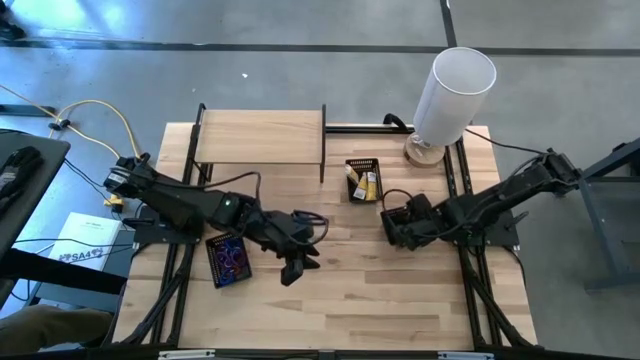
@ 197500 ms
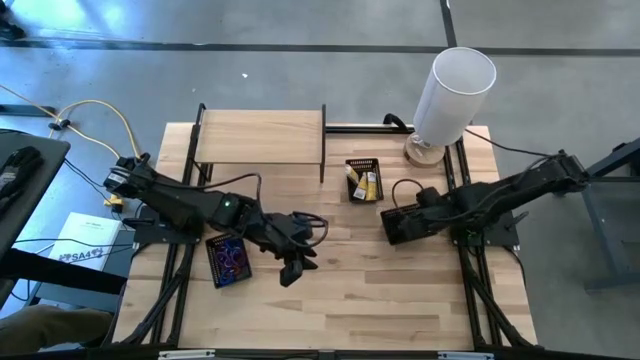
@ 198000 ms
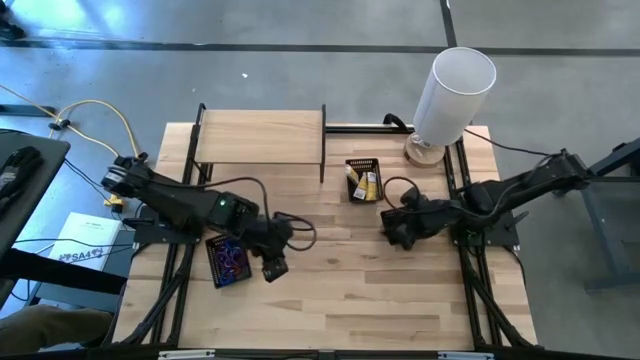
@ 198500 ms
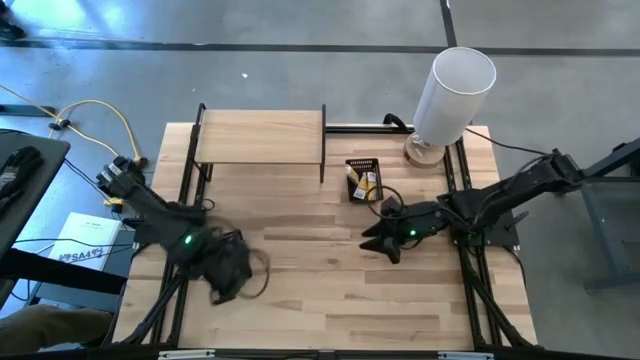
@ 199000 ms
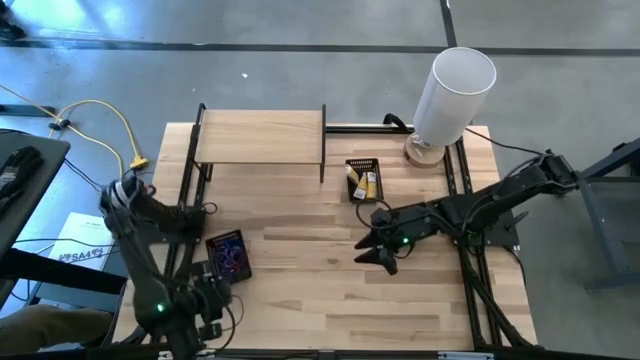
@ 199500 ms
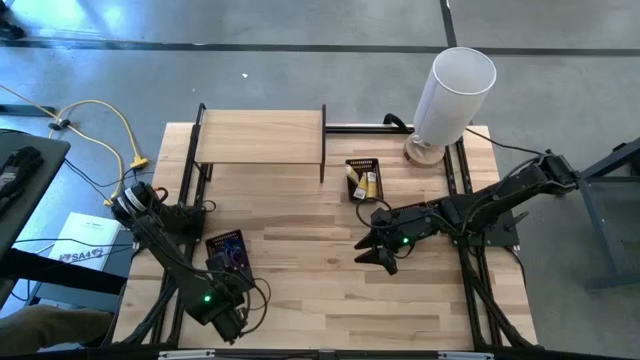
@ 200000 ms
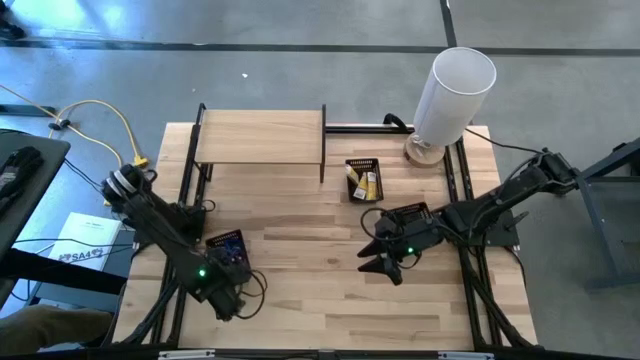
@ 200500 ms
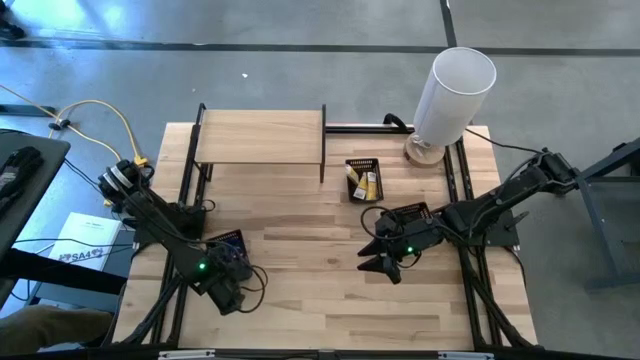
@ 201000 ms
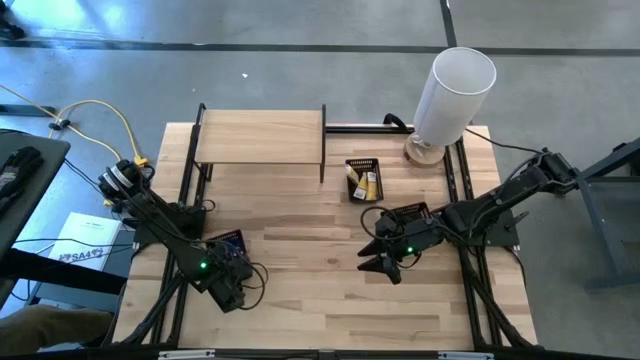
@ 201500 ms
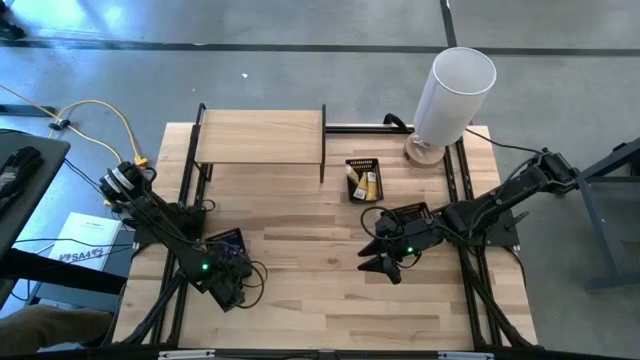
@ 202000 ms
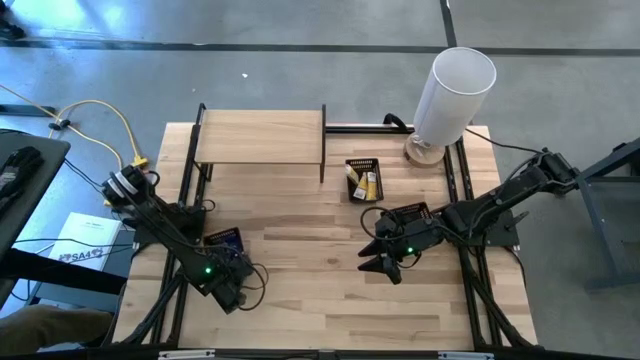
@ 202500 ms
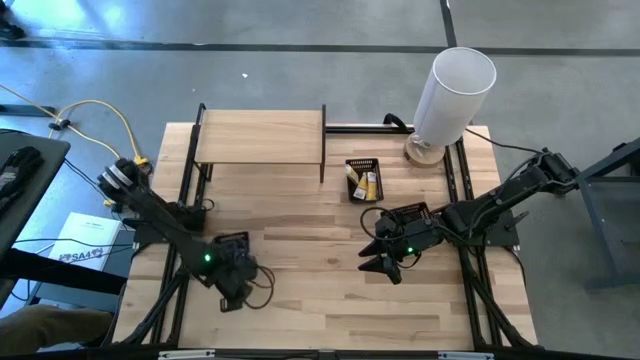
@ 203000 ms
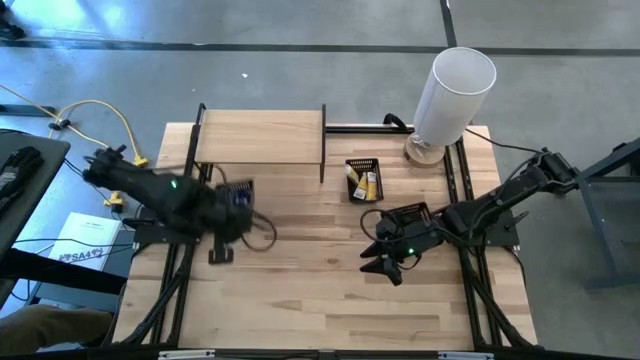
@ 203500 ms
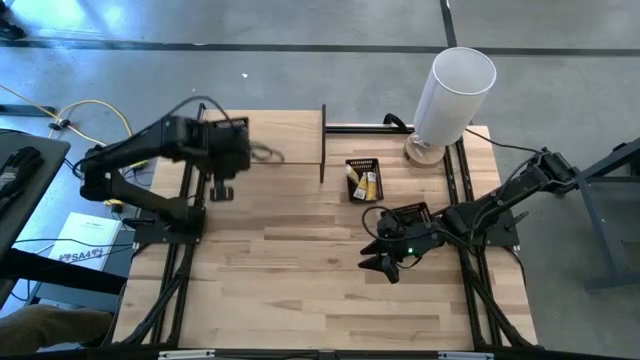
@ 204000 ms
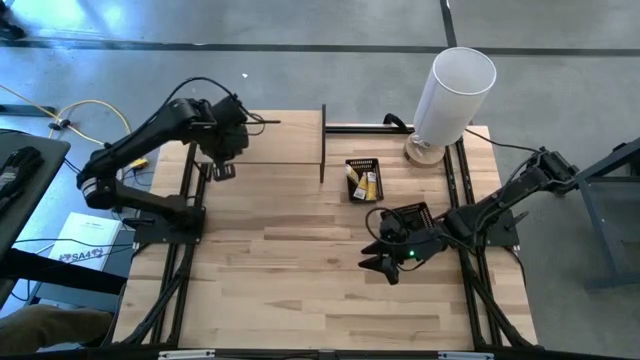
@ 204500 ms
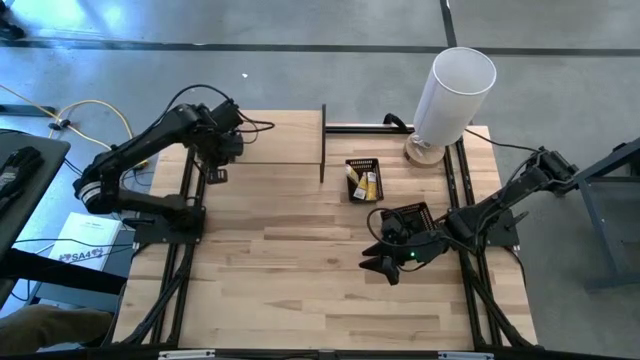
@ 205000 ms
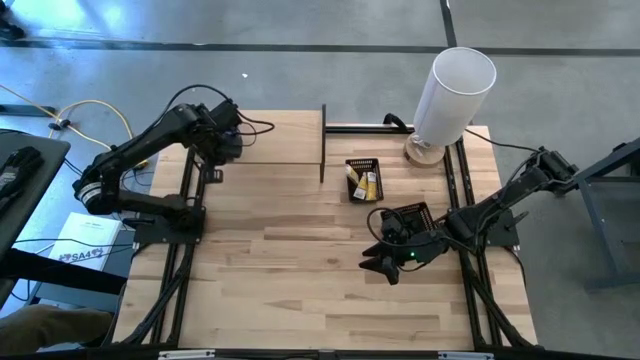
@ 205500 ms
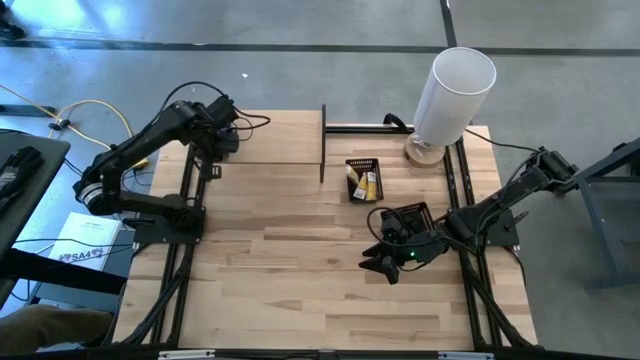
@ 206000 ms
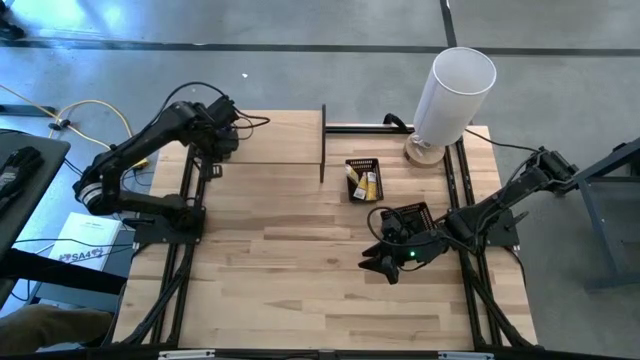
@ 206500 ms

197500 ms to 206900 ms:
Task: Pick & Place Office Desk Supplies
Put the bottom left black bin with spring keychains on the shelf

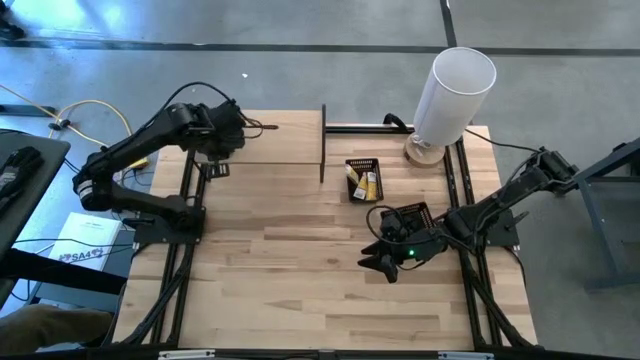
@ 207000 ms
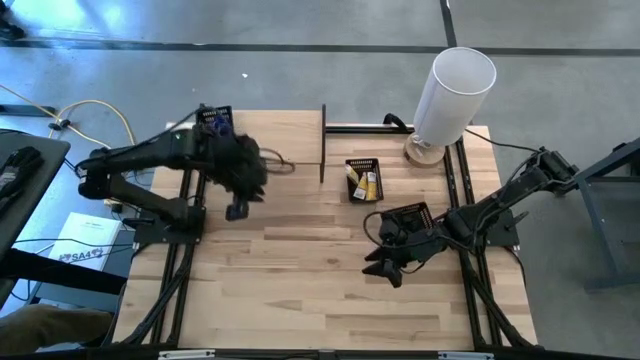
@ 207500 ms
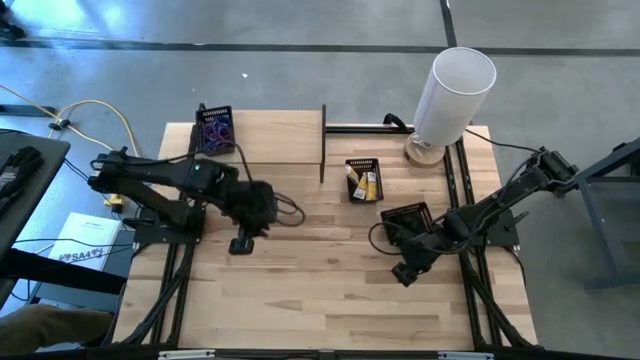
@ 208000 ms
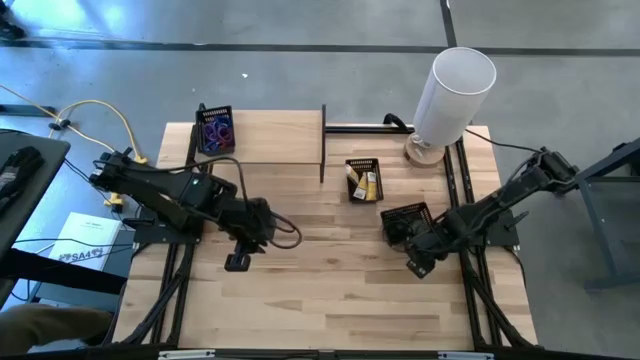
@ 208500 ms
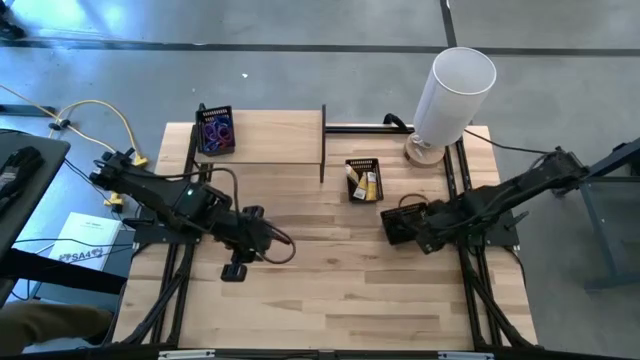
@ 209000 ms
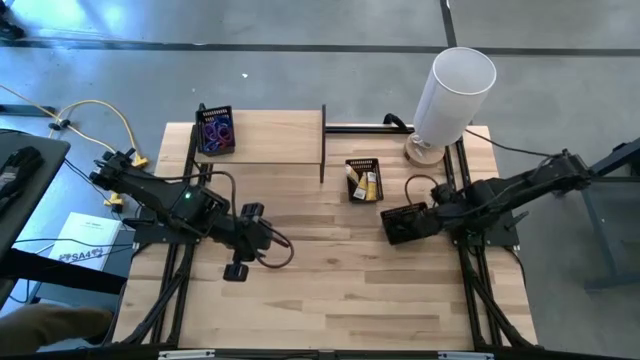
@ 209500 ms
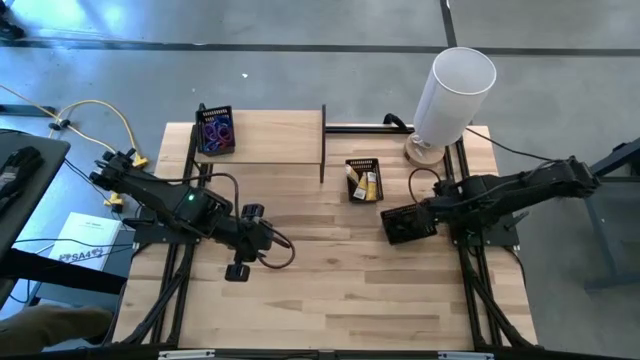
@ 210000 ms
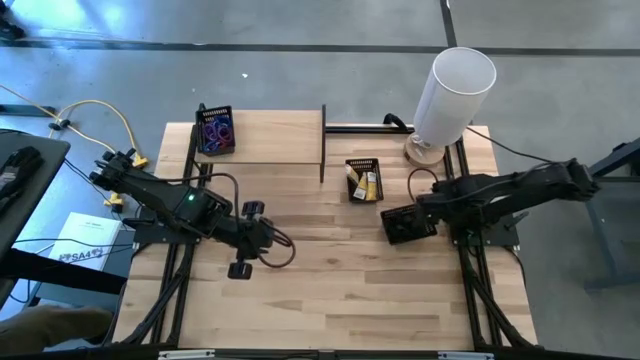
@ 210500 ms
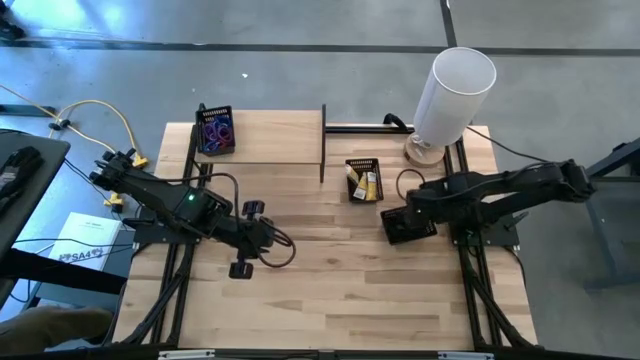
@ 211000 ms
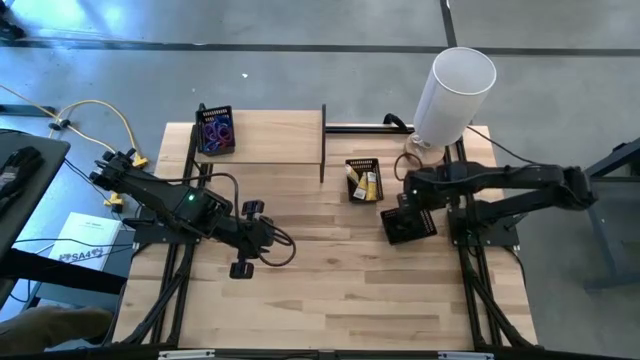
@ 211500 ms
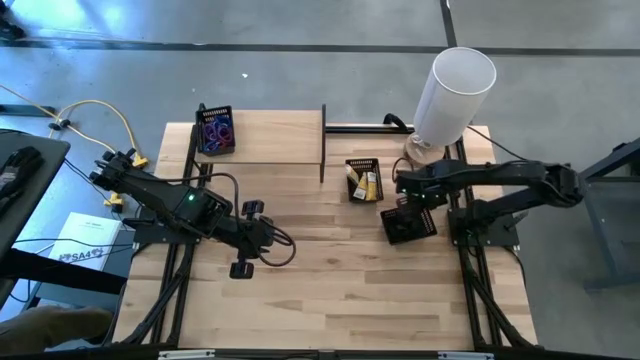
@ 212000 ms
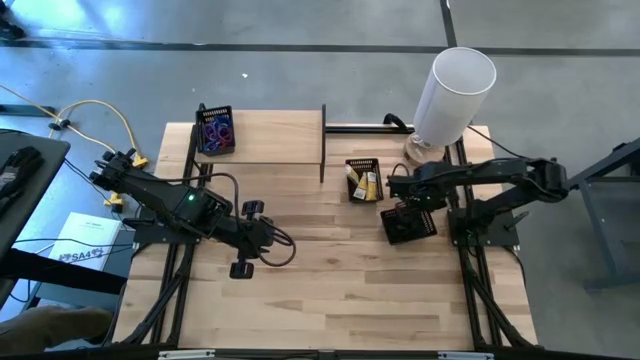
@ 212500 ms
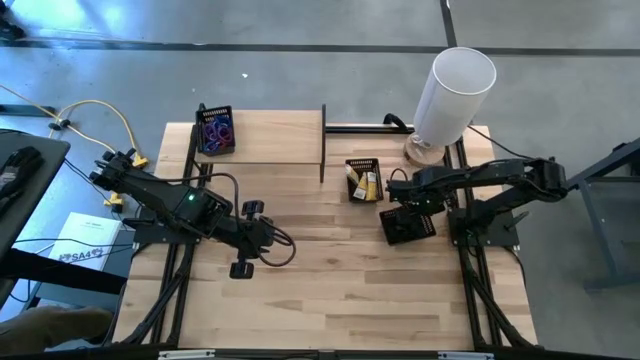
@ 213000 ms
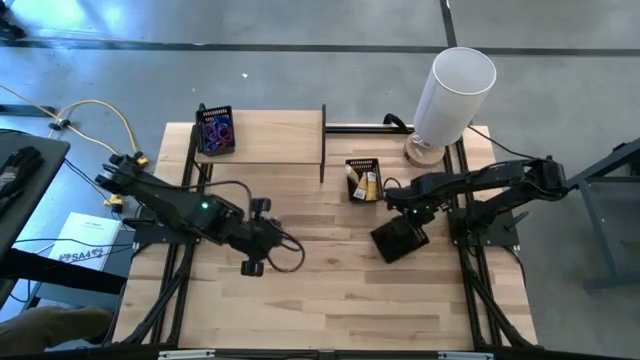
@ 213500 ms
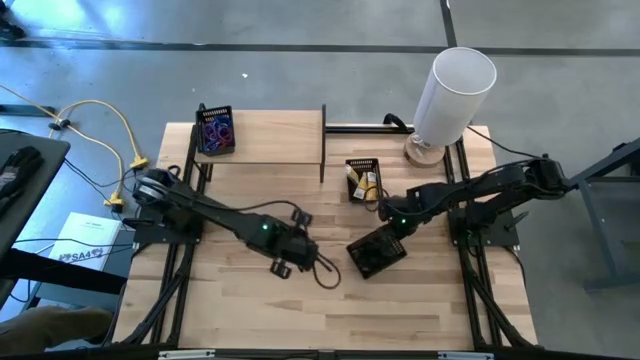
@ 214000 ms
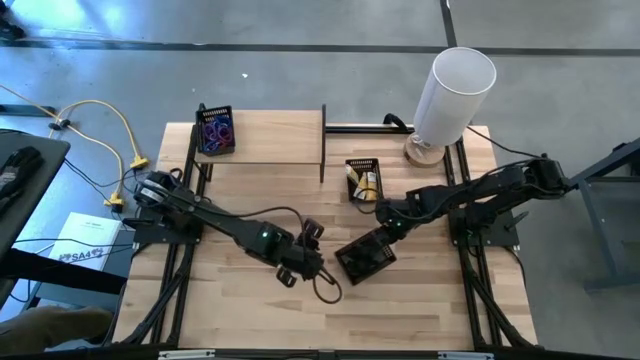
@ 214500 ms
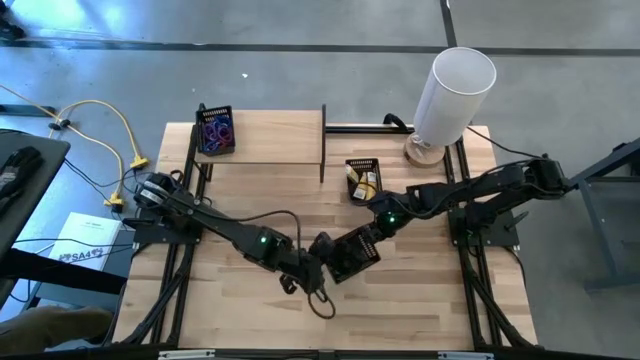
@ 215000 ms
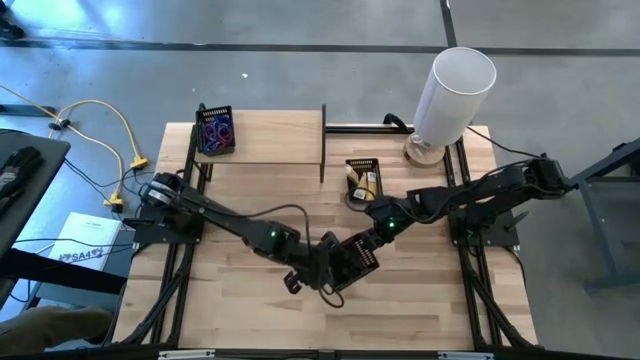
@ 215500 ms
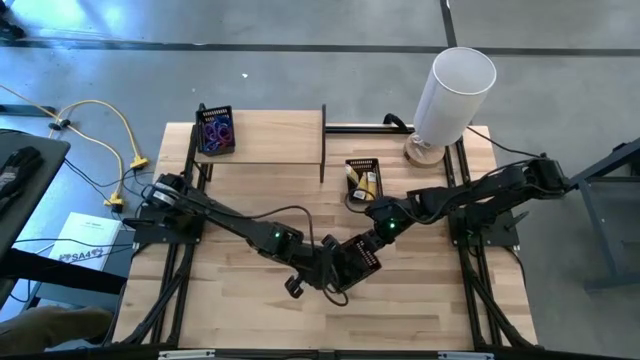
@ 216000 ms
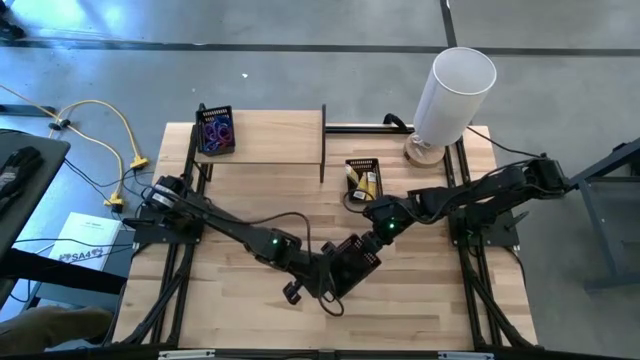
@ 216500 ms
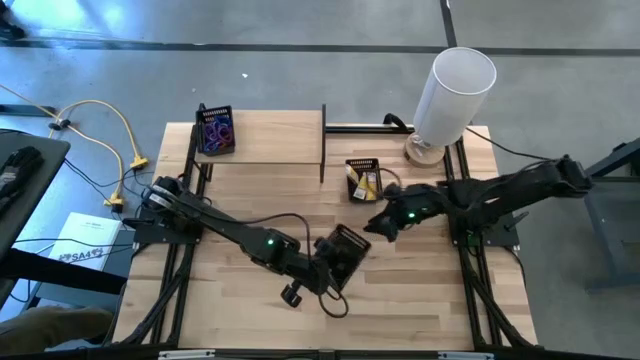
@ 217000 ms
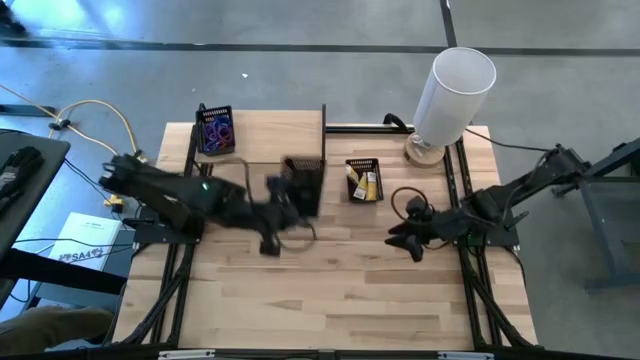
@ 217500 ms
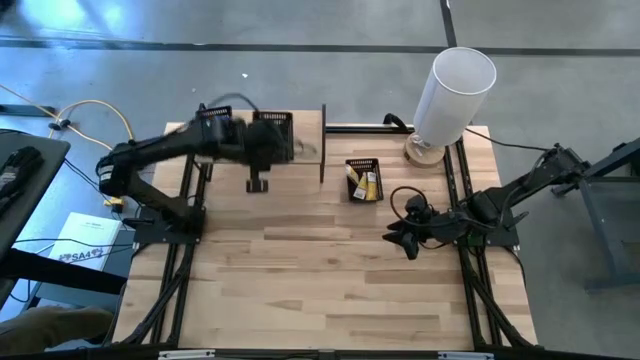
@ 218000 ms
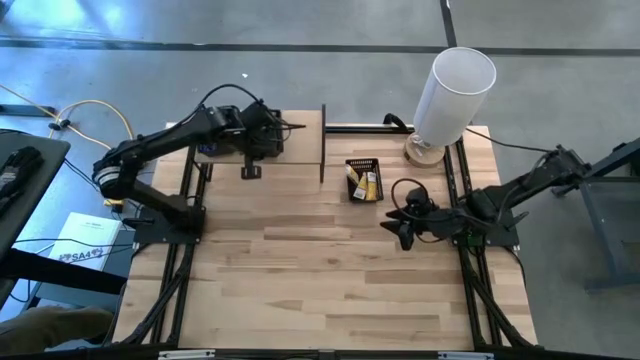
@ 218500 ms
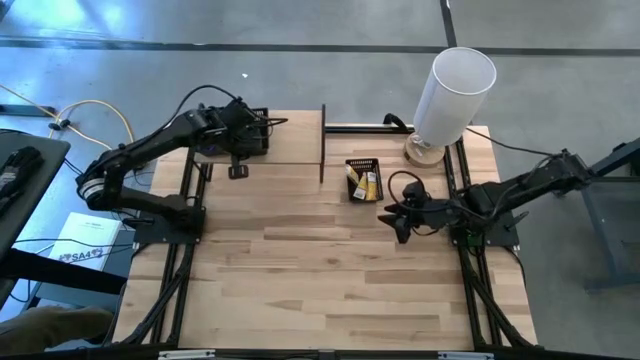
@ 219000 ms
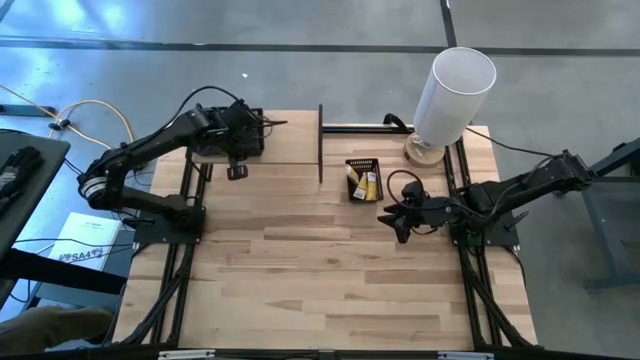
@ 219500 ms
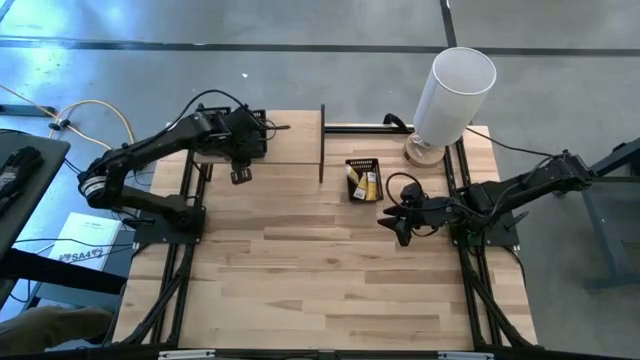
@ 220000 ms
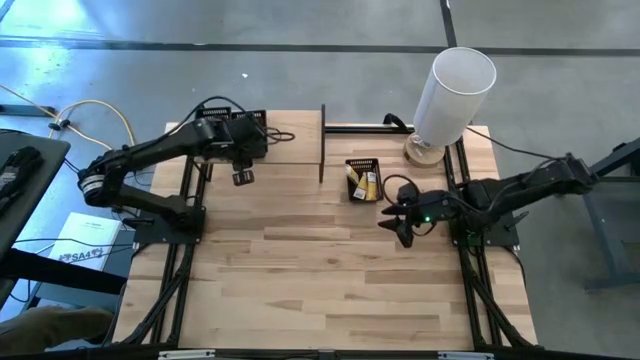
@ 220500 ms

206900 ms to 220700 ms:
Put the bottom black bin with rubberbands on the shelf
